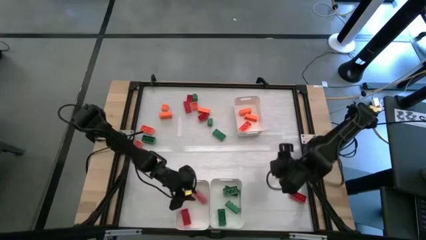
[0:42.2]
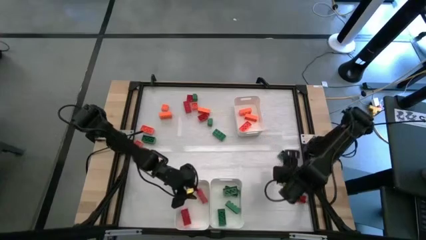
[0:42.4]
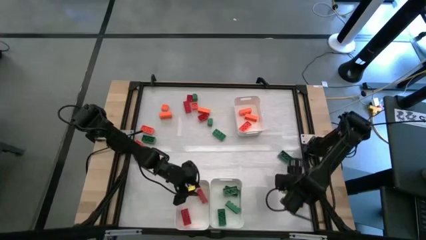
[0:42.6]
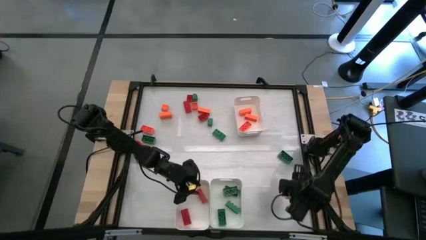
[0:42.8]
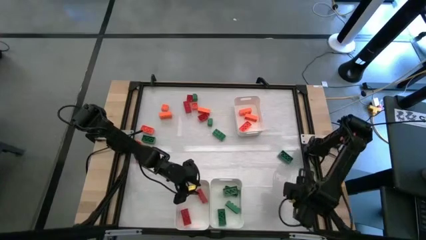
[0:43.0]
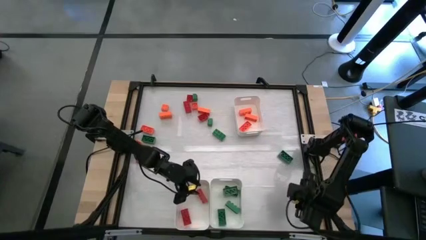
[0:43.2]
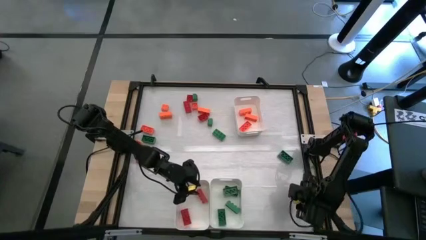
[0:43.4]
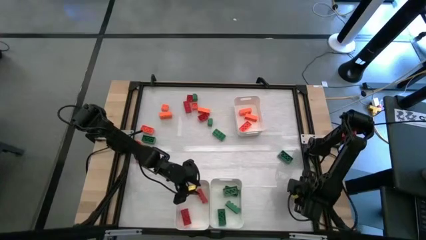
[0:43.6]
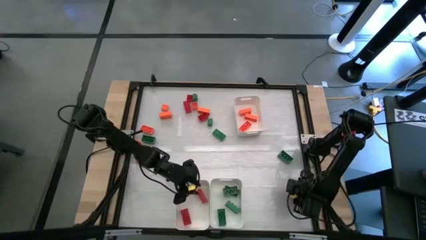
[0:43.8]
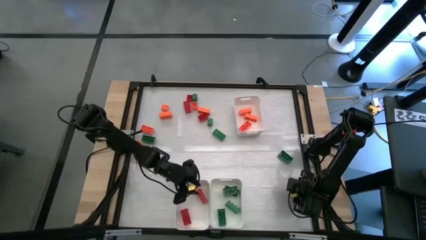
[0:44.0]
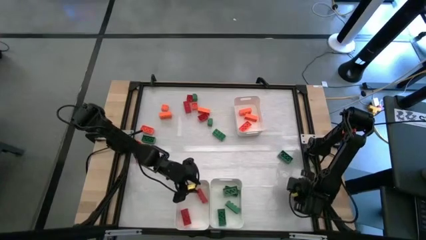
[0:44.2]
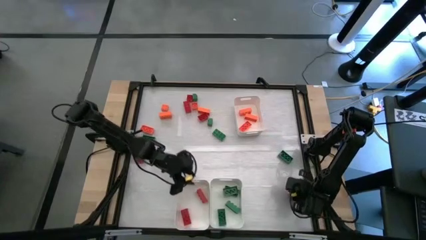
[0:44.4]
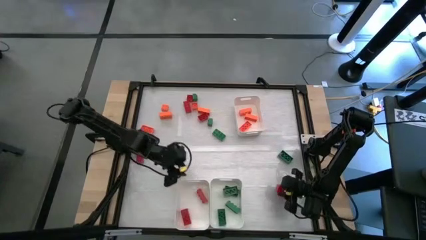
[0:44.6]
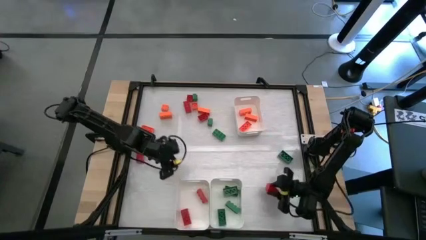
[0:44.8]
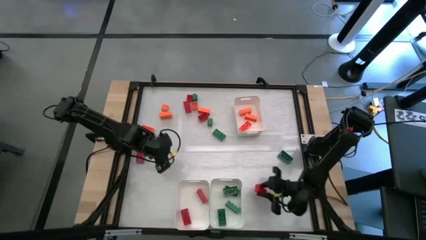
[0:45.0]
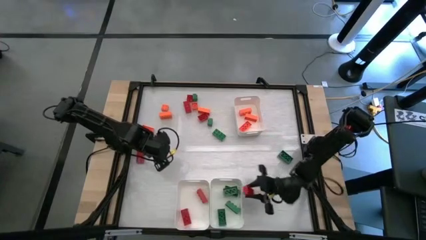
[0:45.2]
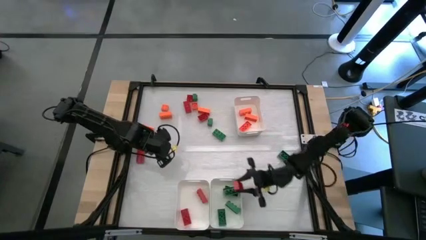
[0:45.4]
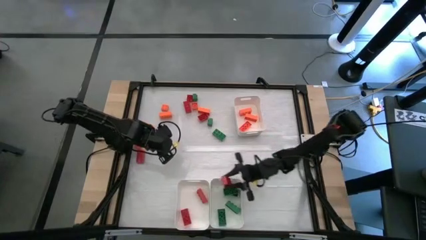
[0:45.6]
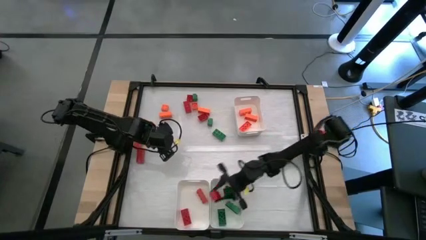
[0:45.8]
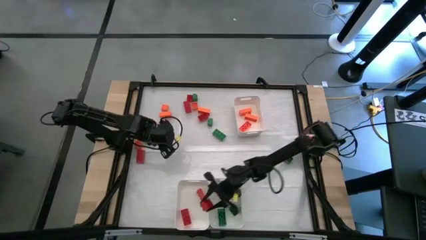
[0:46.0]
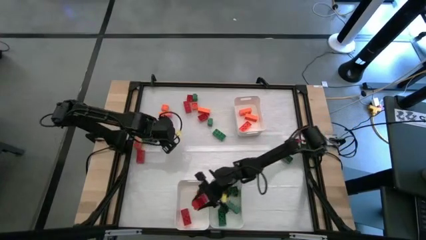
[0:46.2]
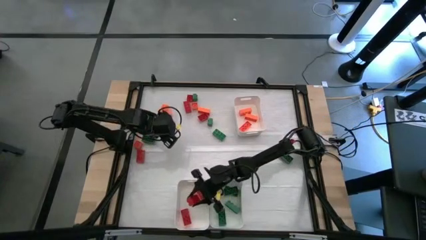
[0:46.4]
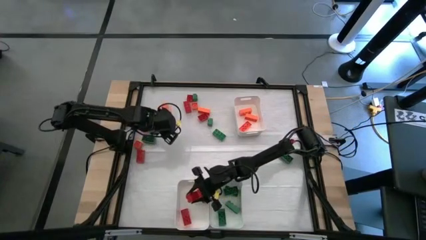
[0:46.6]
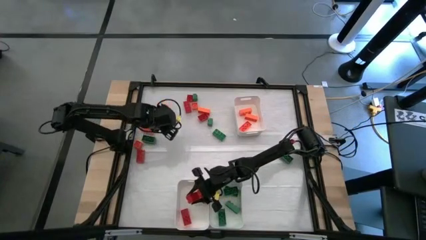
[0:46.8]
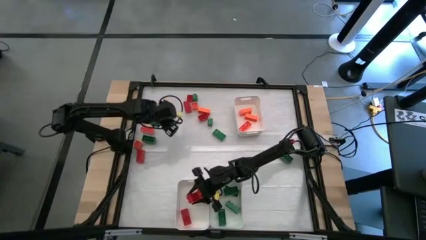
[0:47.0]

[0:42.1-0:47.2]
Task: Sort blocks
Put the red game piece into the bottom left white bin

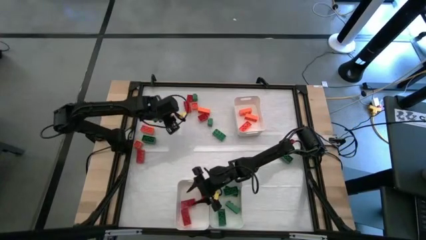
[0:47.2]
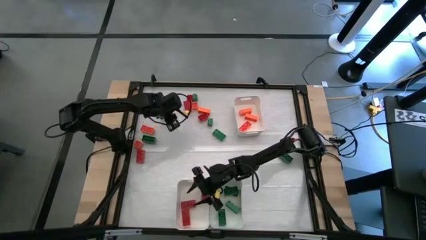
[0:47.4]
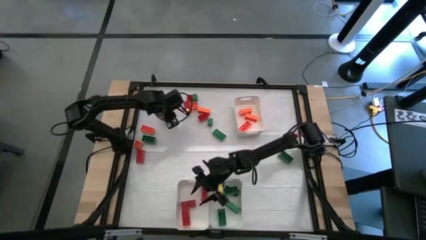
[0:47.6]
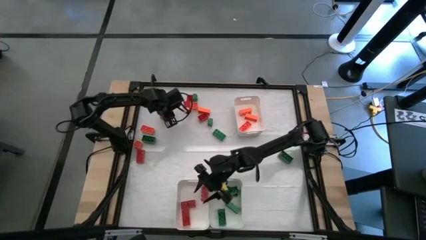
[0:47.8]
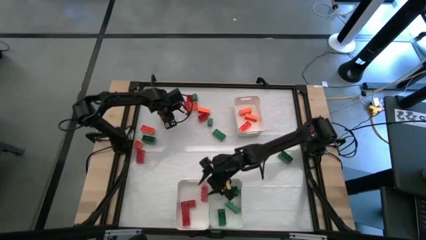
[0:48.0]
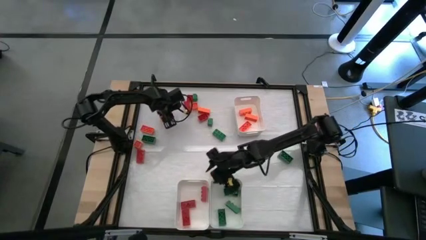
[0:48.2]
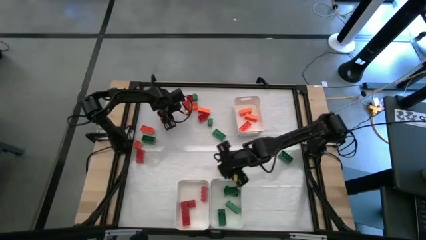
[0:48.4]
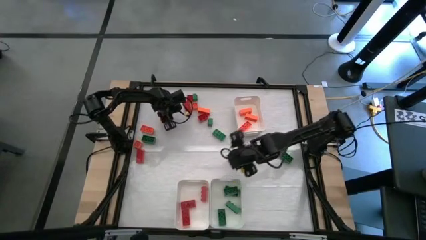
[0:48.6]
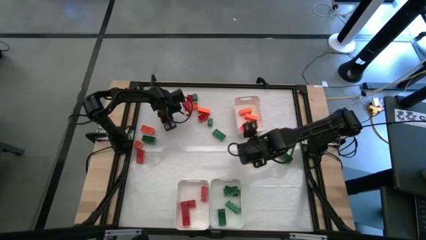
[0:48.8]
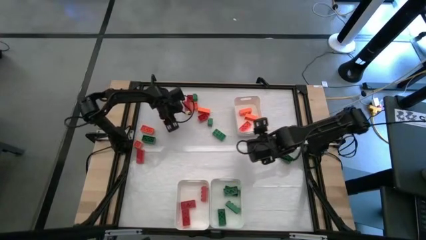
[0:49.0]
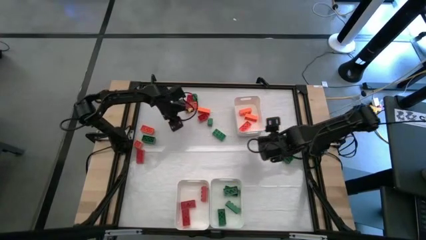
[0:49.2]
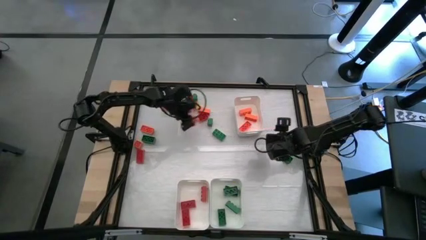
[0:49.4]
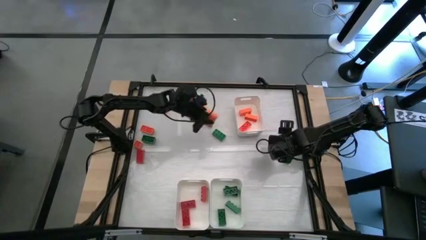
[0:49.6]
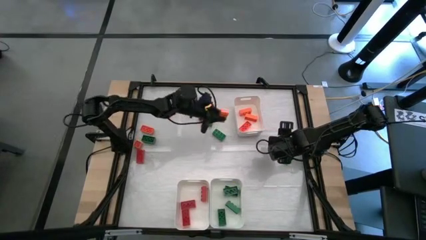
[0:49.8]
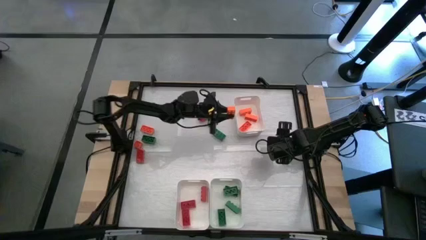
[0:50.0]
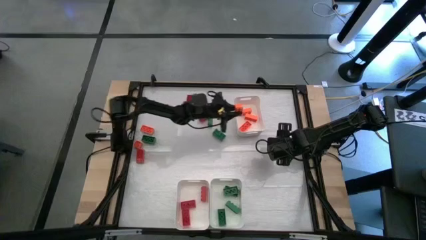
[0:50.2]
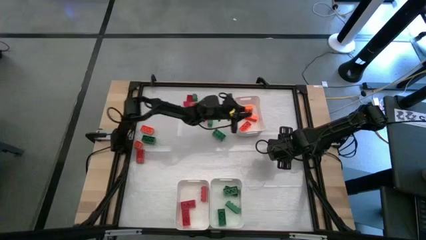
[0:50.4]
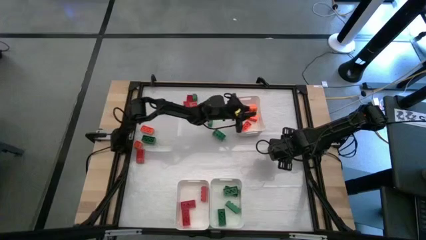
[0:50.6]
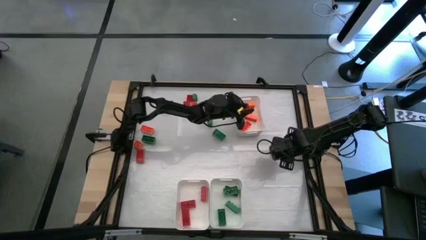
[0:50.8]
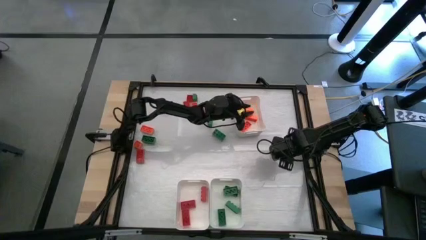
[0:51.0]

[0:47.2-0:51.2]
Put the orange game piece into the top right white bin

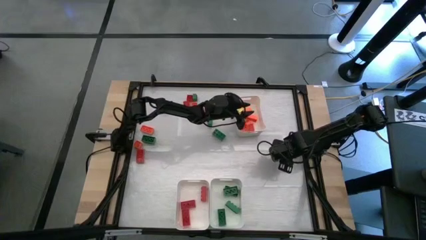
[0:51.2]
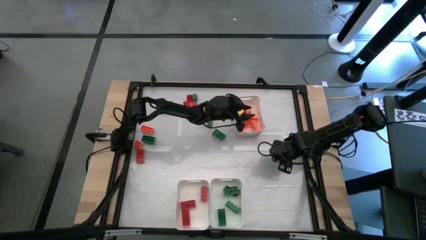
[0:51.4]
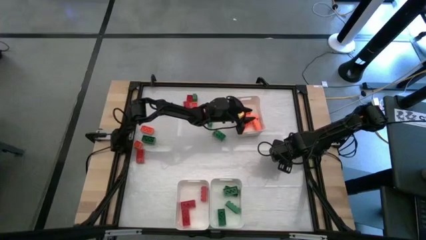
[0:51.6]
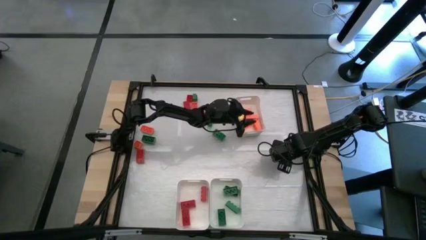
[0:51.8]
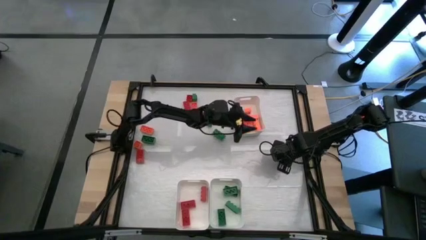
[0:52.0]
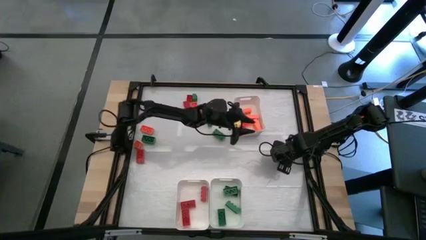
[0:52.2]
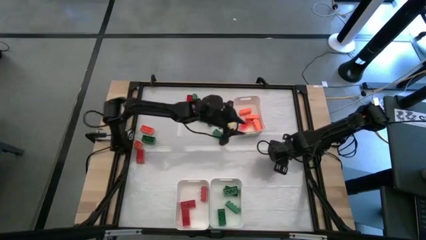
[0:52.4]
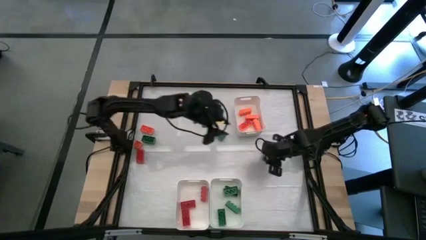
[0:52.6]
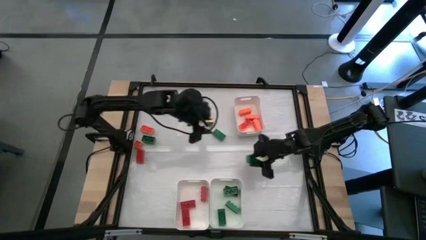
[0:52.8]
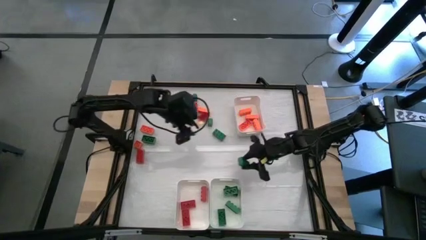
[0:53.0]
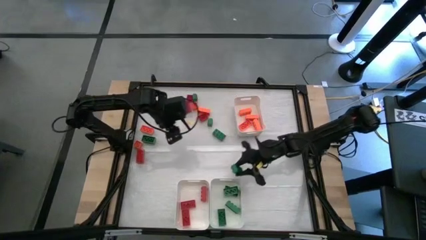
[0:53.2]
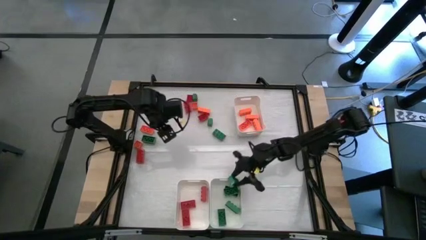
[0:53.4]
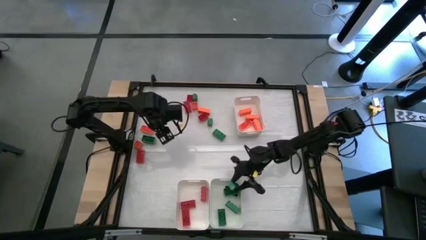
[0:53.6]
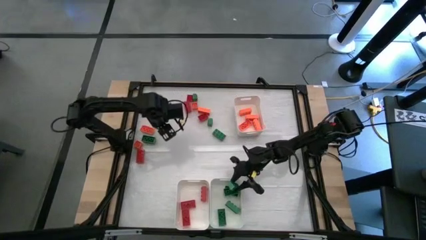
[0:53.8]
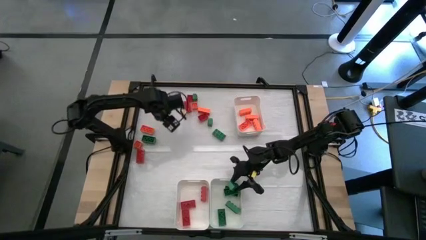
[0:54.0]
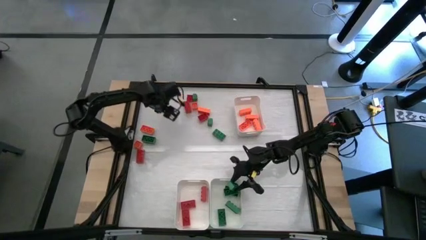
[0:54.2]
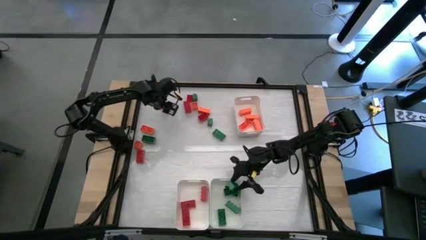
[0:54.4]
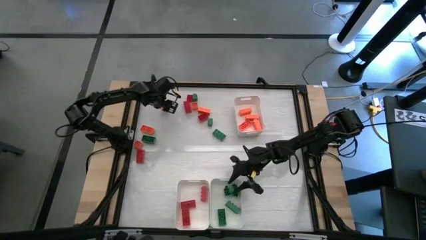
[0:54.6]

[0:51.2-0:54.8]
Put the green game piece into the bottom right white bin

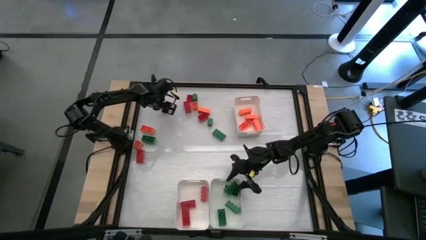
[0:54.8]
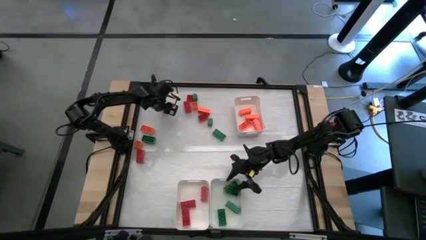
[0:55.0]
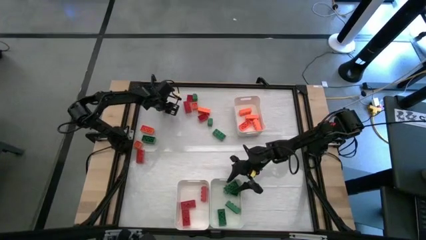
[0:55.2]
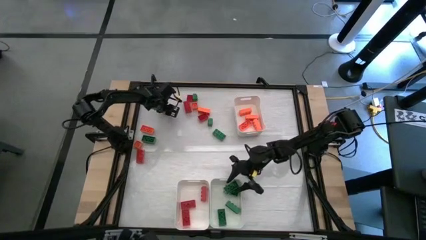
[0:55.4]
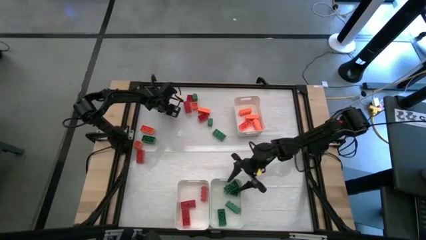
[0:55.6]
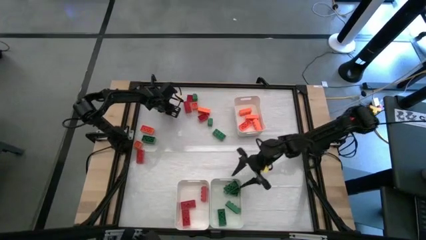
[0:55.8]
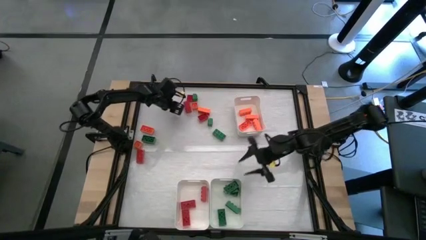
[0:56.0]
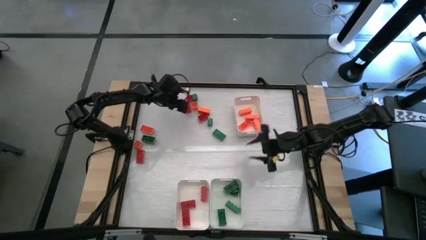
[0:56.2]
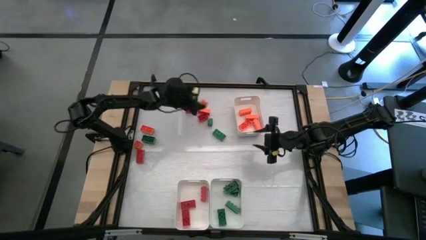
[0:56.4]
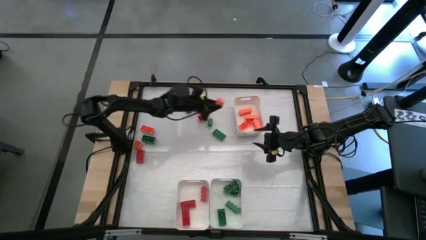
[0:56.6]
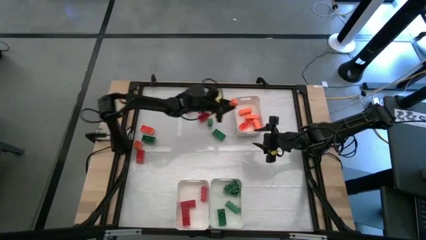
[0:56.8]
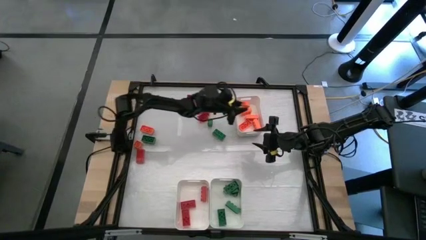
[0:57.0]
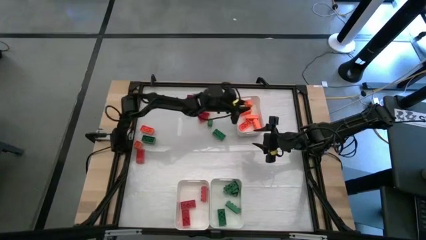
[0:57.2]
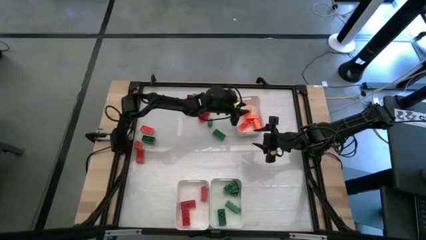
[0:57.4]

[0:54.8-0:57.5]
Put the orange game piece into the top right white bin

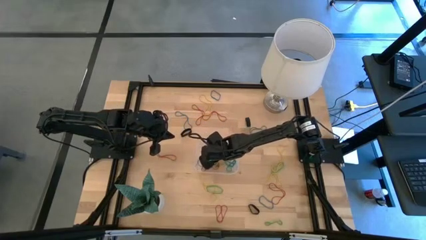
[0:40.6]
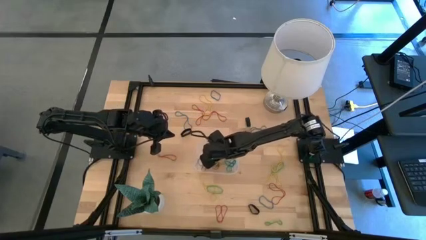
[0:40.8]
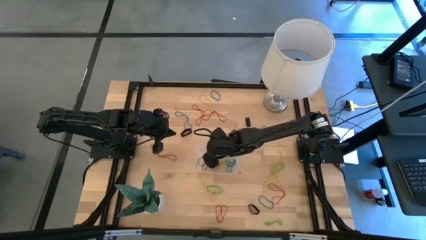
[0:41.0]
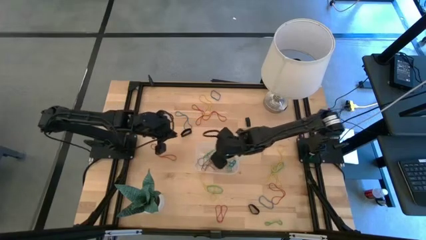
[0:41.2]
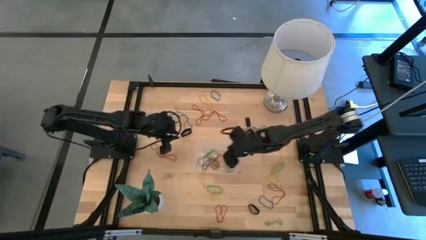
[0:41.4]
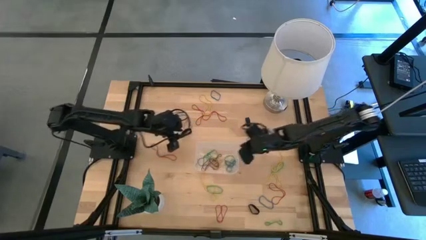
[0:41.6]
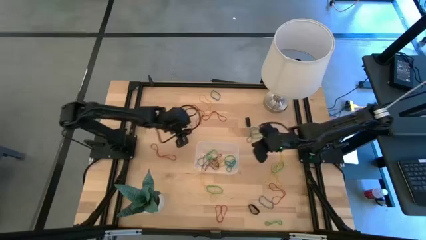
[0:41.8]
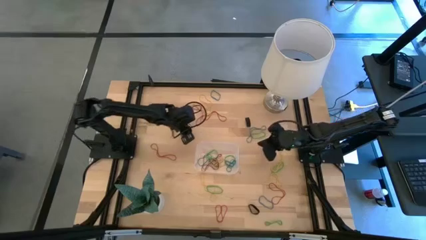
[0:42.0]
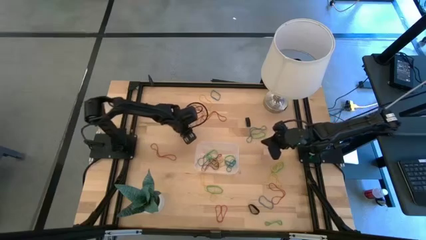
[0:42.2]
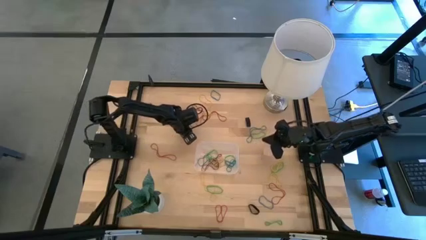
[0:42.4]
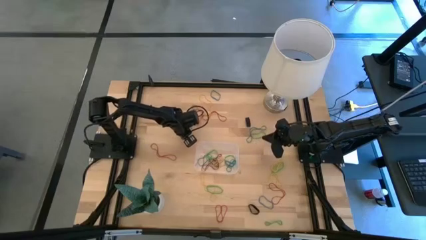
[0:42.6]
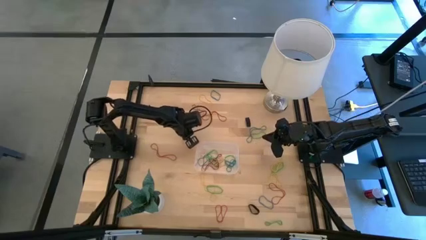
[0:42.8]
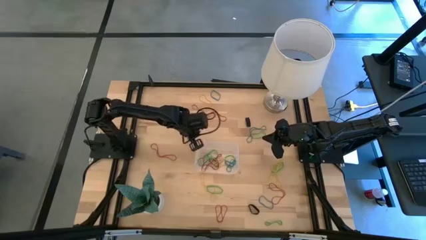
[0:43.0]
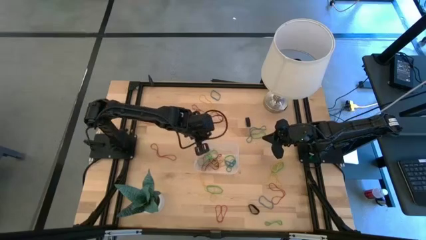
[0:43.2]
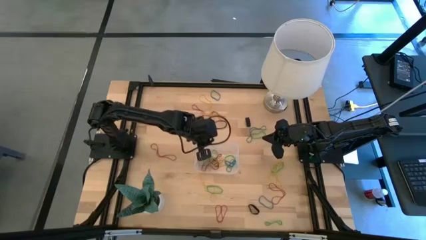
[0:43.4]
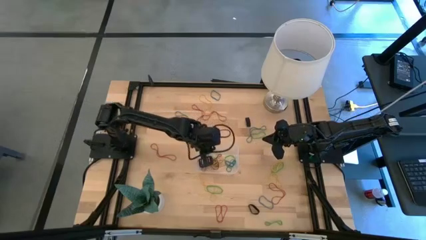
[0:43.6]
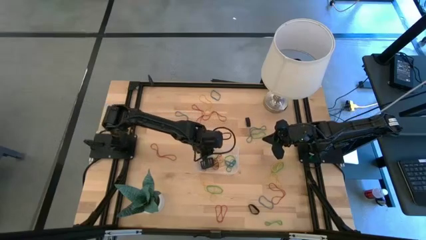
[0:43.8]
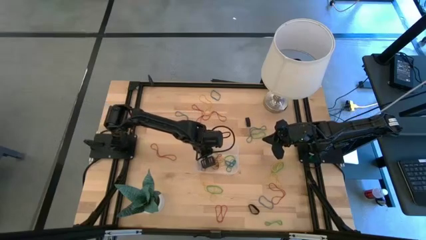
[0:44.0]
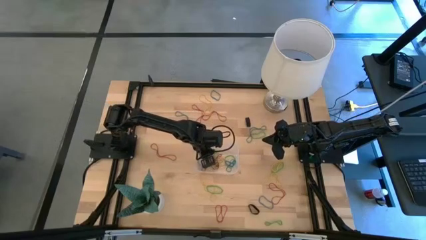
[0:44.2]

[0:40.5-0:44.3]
Task: Pick and place rubber bands into bin
Put the black rubber band into the transparent bin
